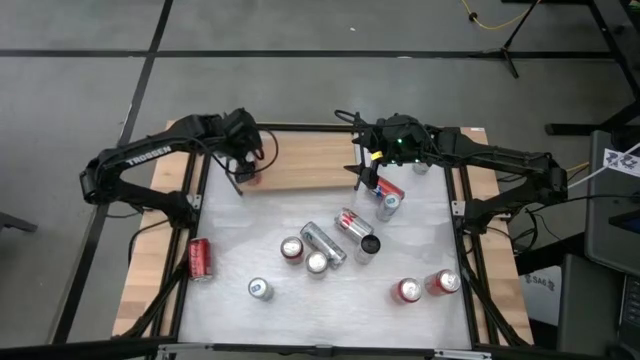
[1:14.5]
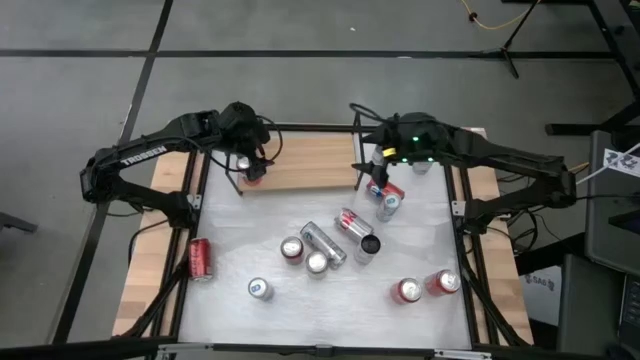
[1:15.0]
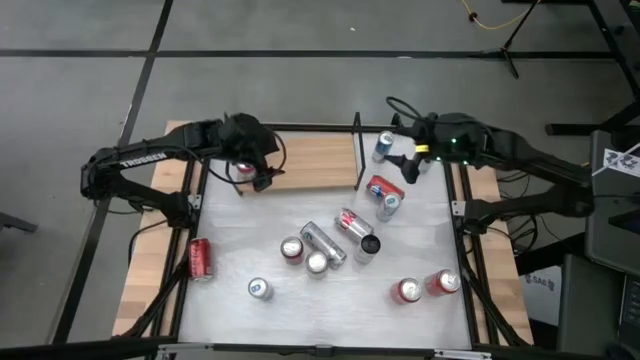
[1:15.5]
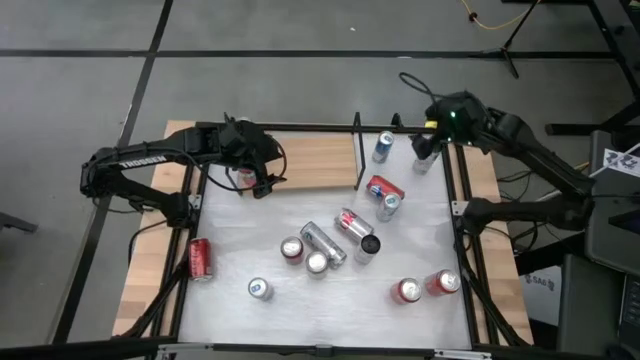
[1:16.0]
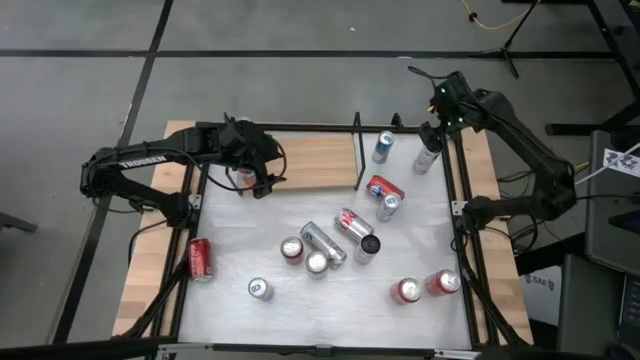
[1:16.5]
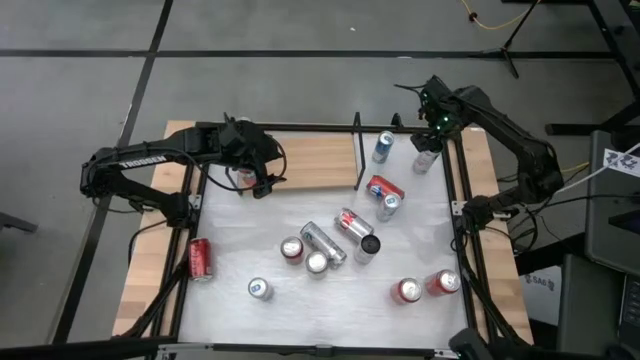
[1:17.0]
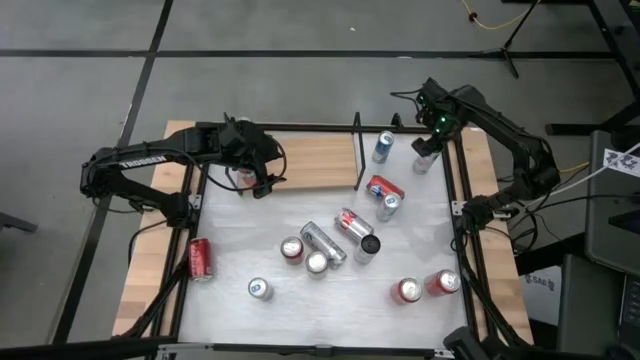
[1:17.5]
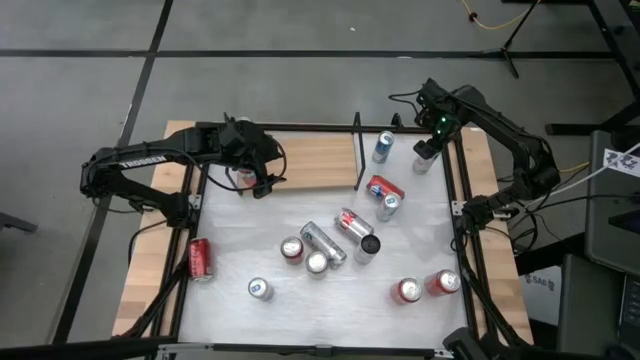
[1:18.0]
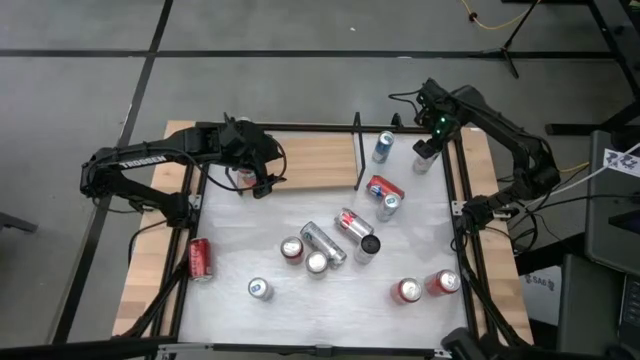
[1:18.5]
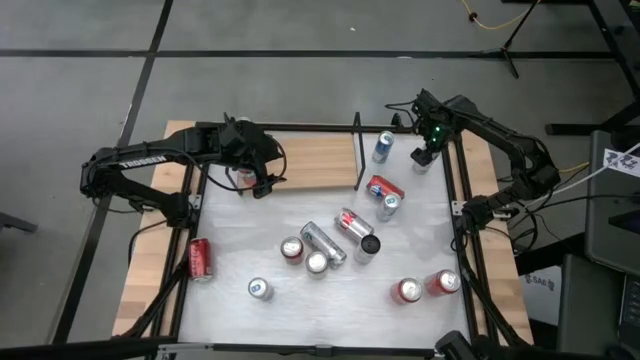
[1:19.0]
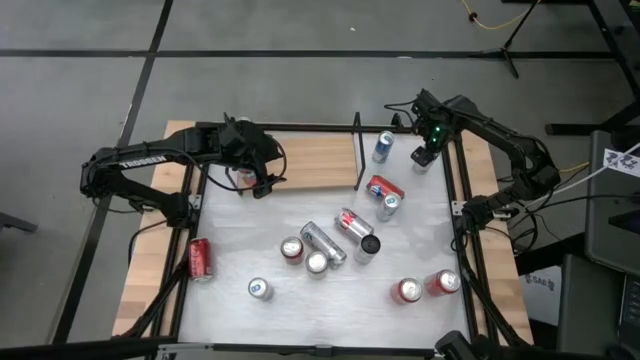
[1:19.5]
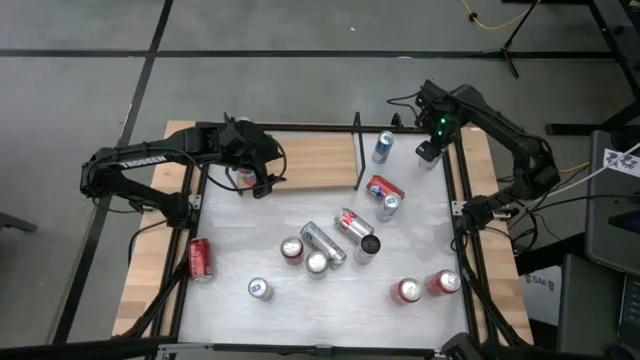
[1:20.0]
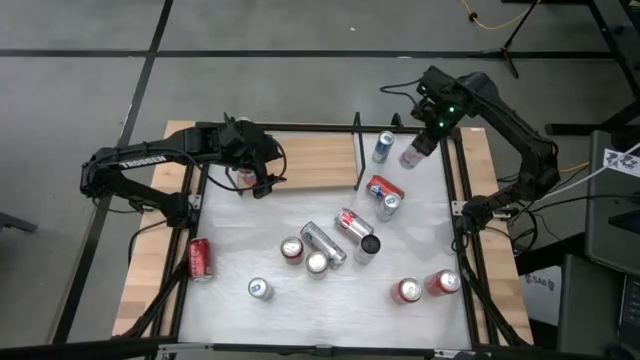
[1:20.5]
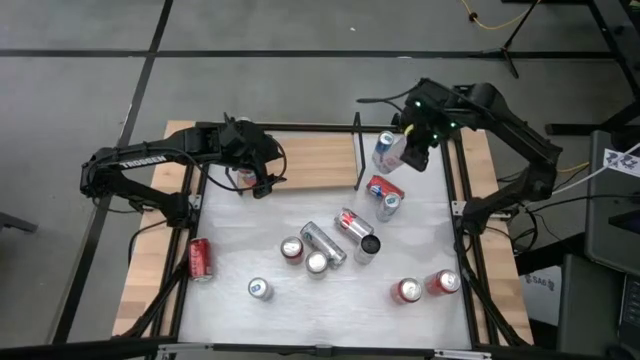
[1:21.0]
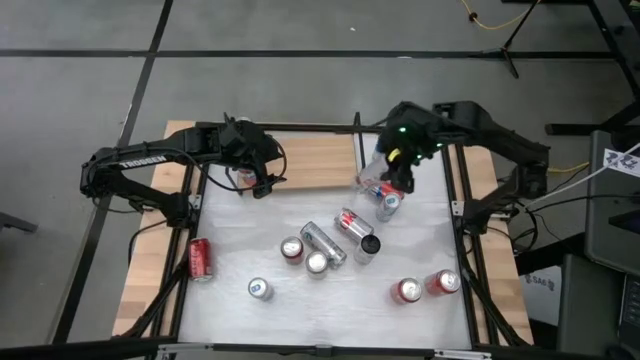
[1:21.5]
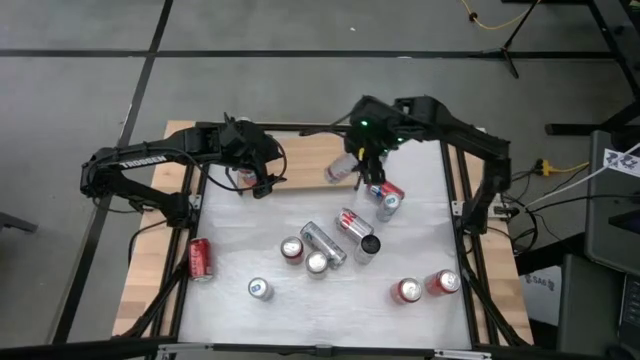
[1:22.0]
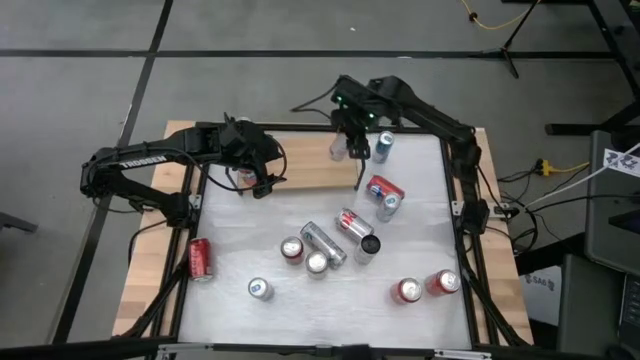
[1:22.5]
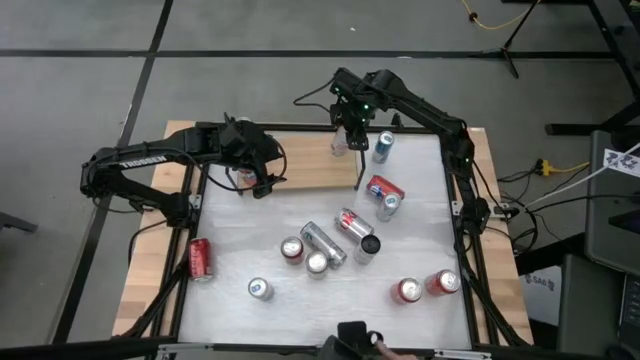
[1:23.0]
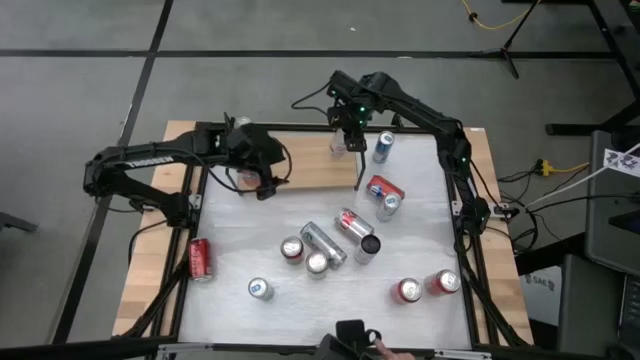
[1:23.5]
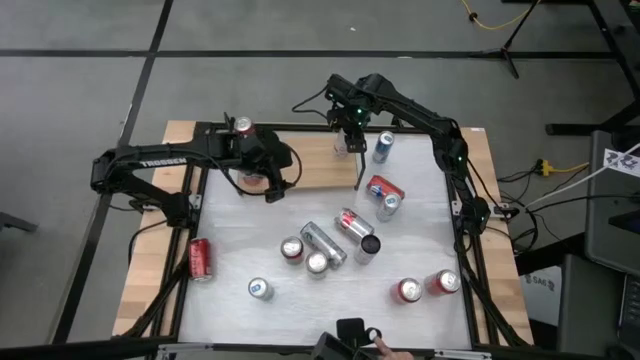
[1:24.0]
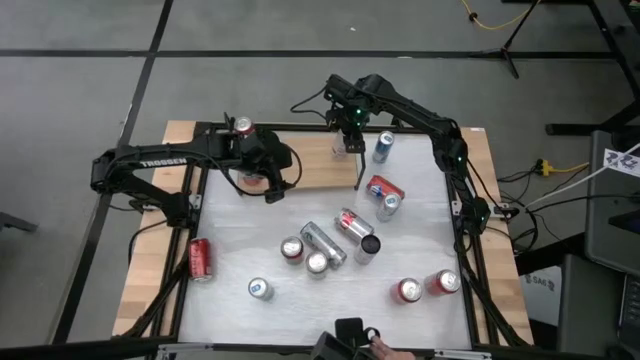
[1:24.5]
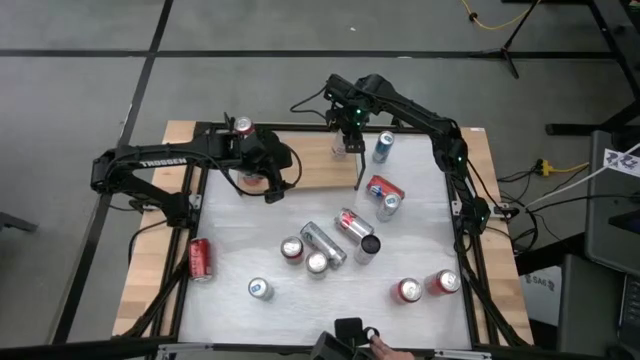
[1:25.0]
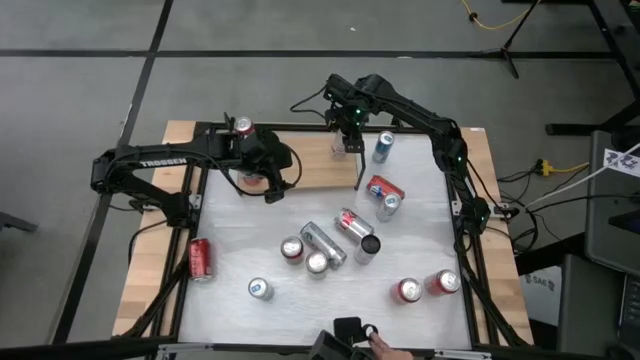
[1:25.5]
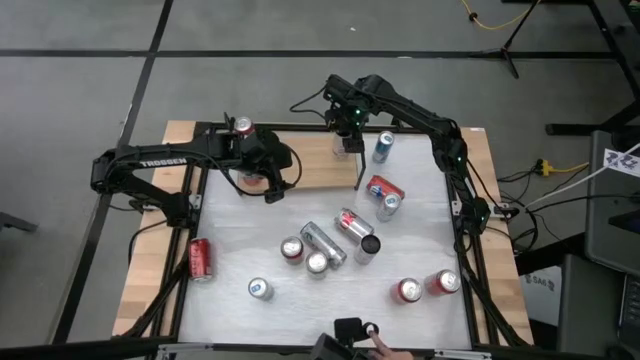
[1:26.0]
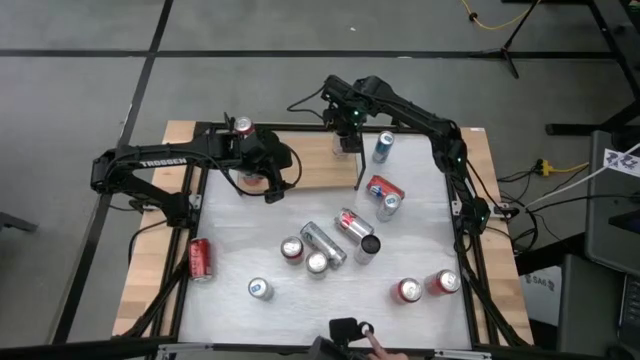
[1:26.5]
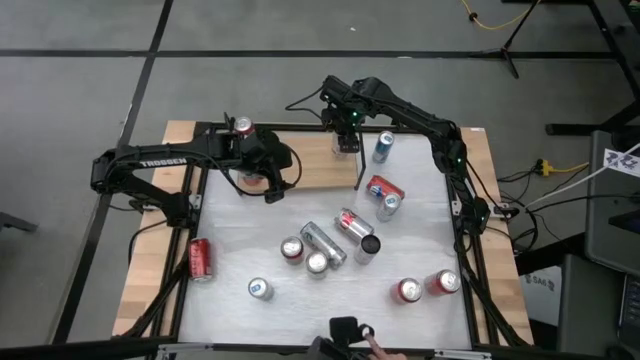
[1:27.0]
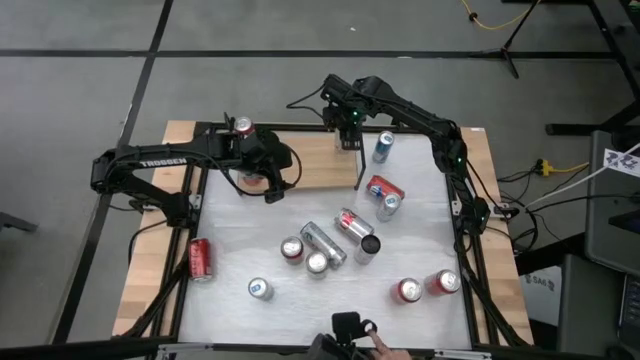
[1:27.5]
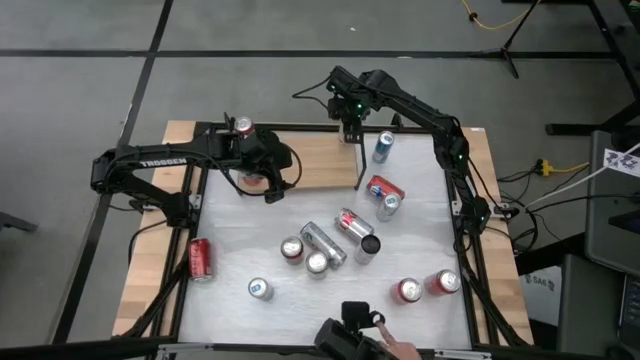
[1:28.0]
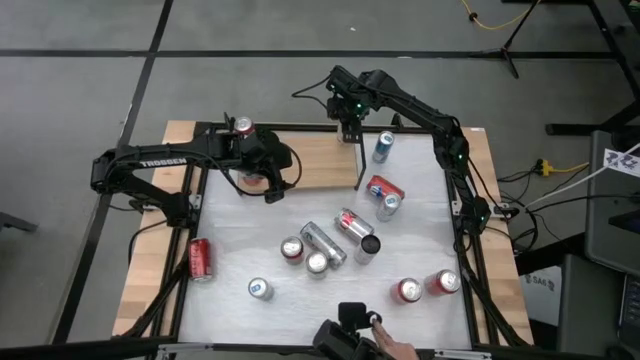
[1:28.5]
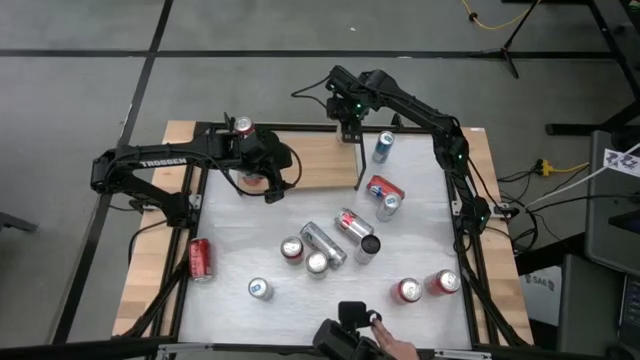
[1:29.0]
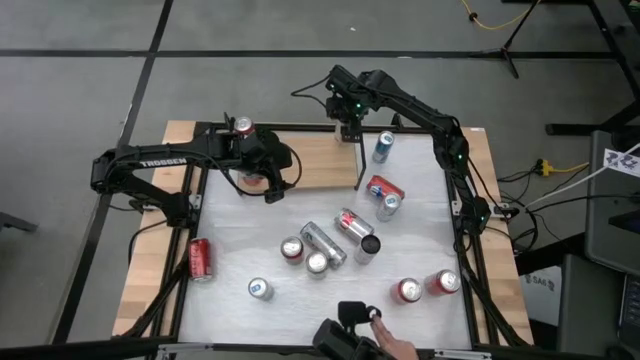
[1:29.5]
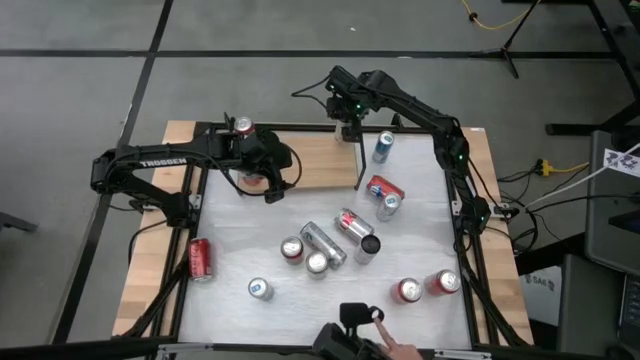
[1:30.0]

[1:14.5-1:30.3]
Task: Place canned beverage on shelf
Put the white pink soda can on the shelf

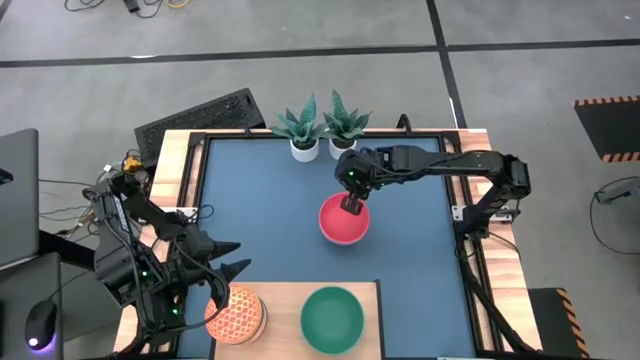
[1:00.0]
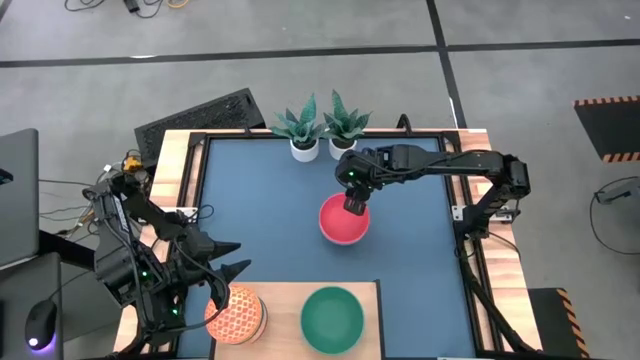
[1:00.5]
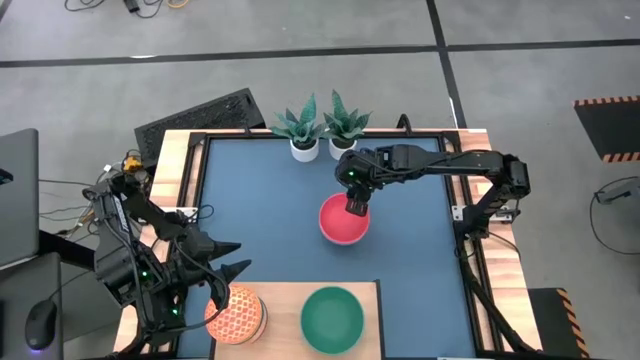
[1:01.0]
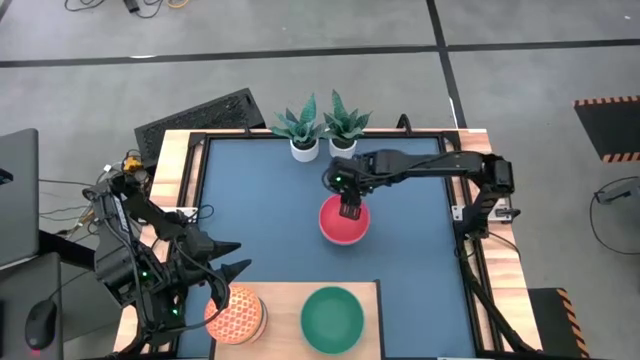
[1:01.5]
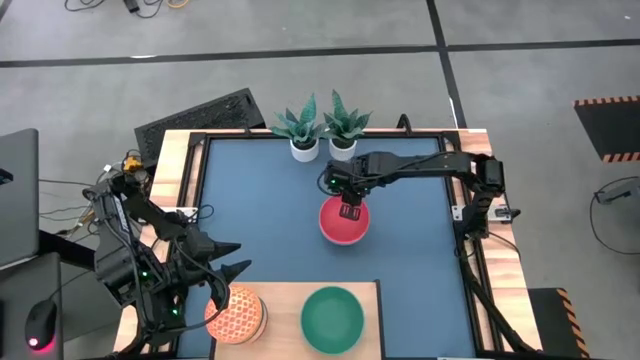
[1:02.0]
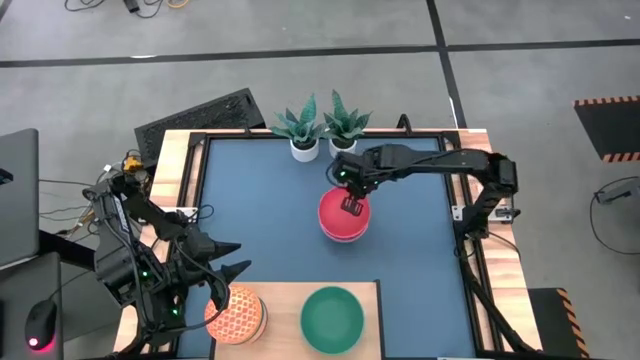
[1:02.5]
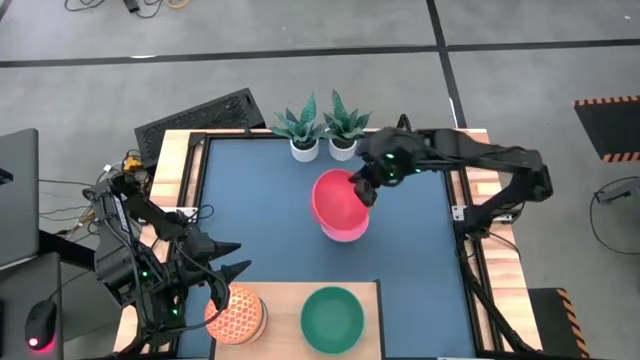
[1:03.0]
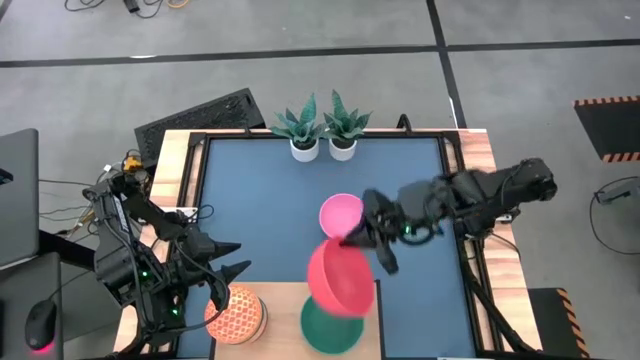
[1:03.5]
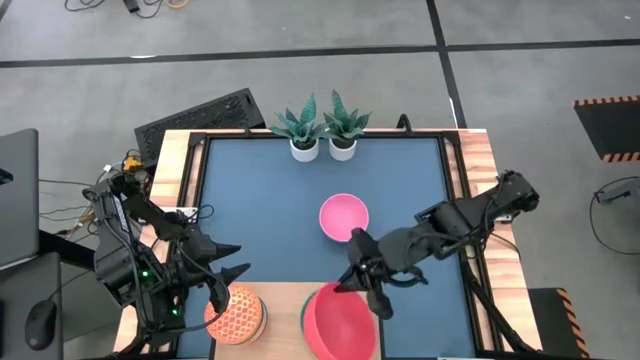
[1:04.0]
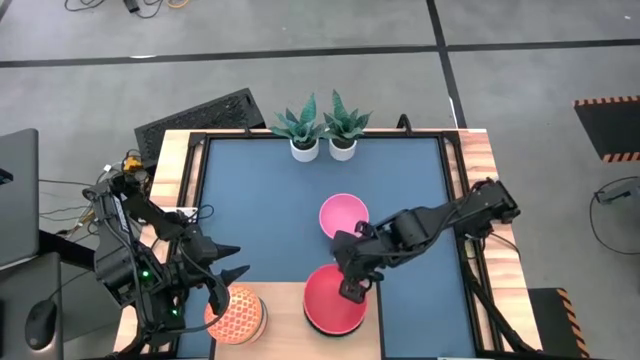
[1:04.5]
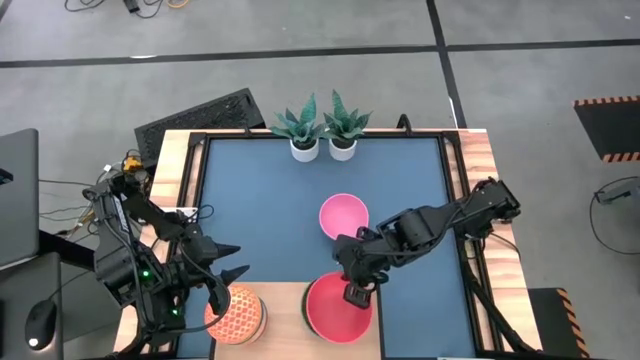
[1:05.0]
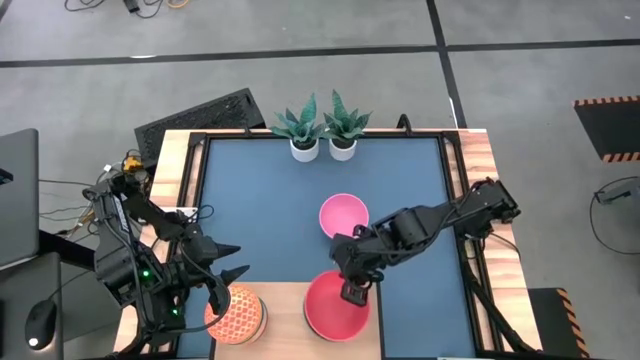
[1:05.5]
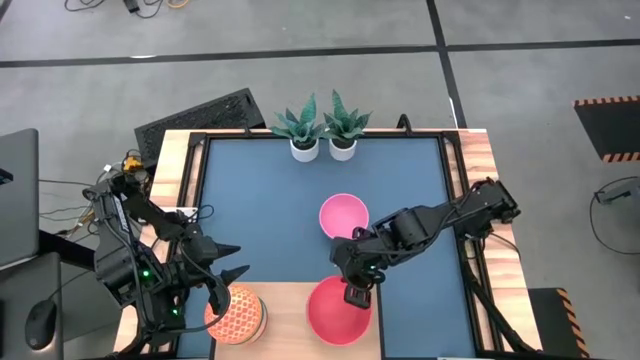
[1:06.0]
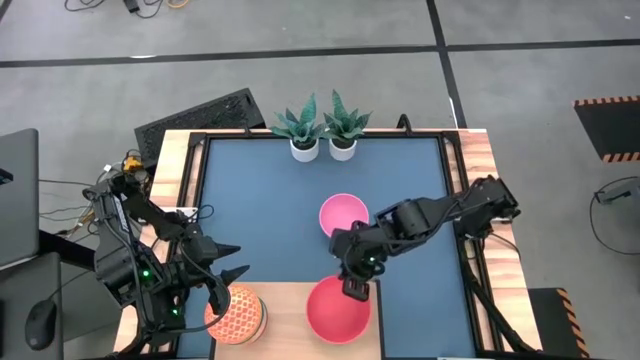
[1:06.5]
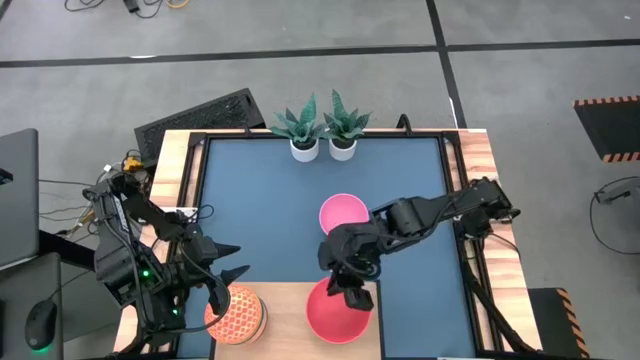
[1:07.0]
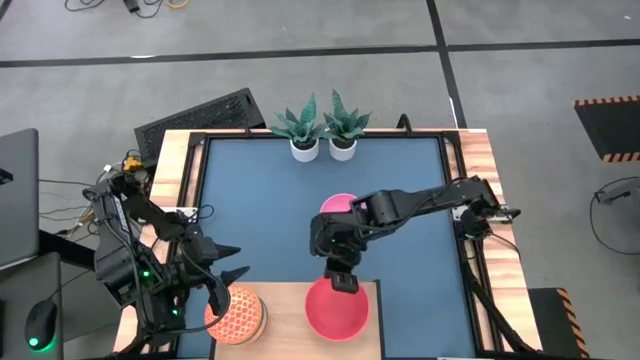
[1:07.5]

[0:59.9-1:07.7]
Task: Place and stack bowls onto a shelf
Stack the orange bowl on top of the green bowl on the shelf
